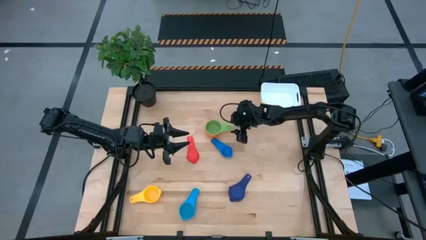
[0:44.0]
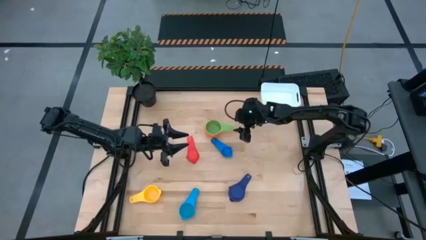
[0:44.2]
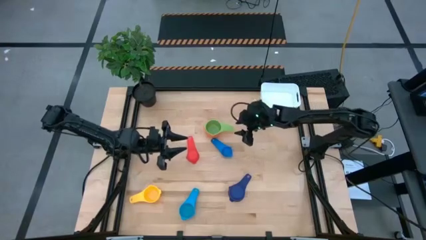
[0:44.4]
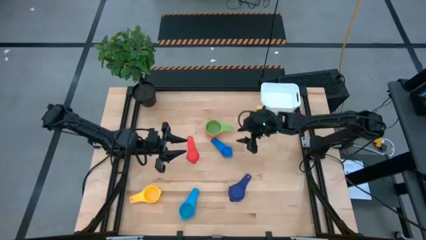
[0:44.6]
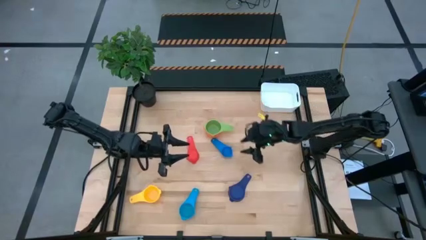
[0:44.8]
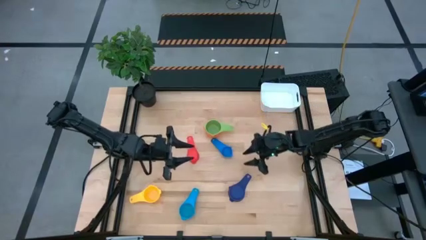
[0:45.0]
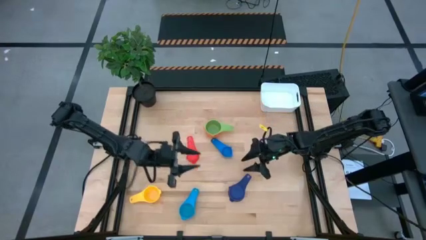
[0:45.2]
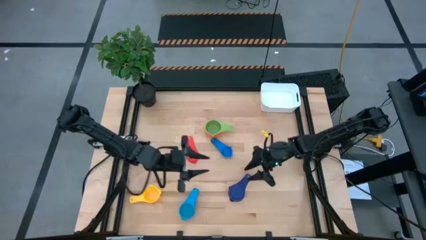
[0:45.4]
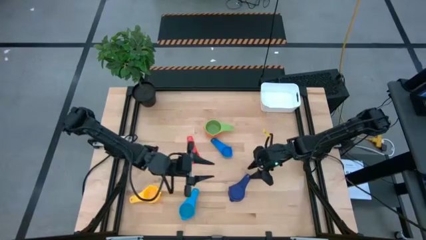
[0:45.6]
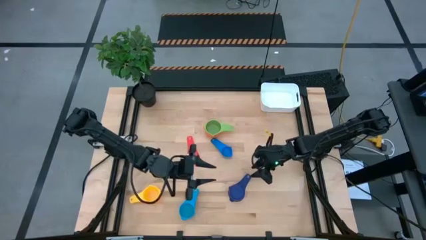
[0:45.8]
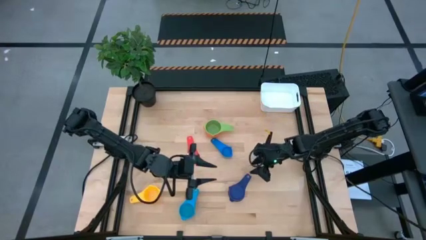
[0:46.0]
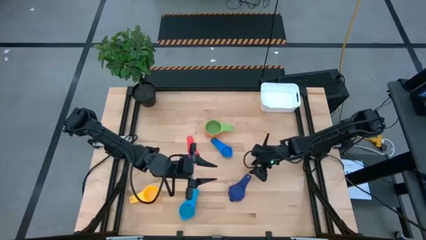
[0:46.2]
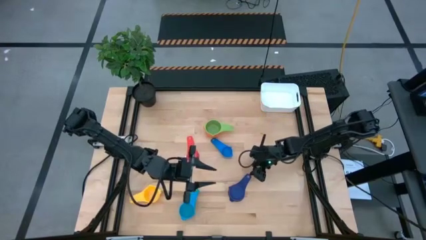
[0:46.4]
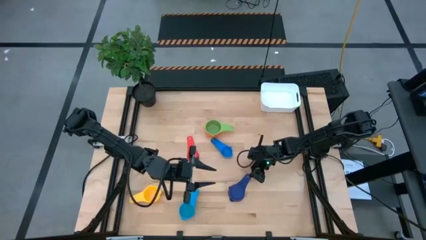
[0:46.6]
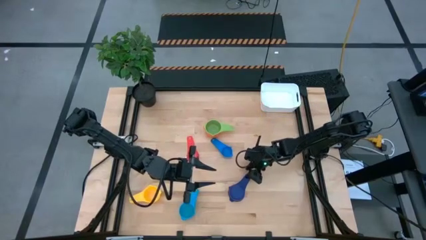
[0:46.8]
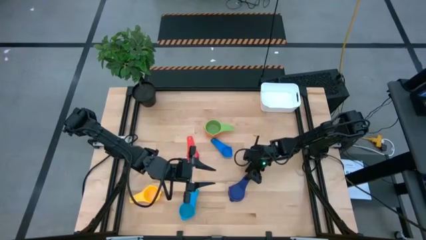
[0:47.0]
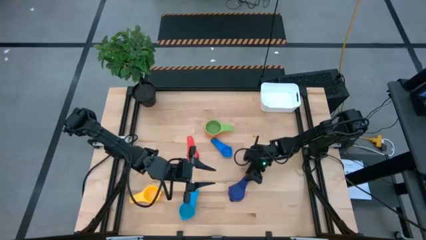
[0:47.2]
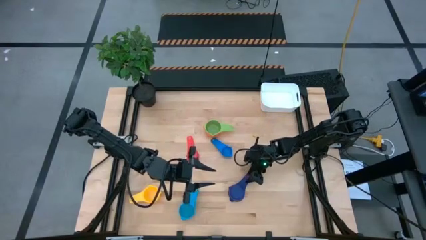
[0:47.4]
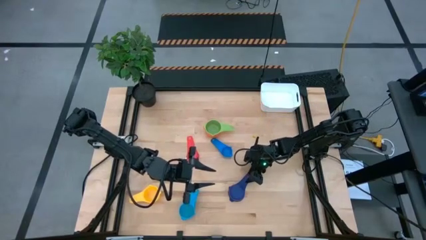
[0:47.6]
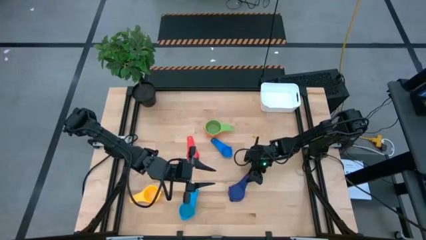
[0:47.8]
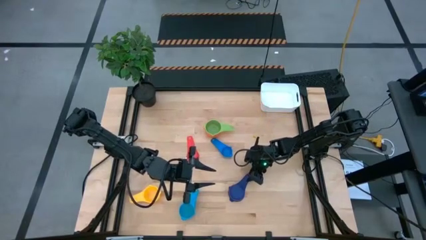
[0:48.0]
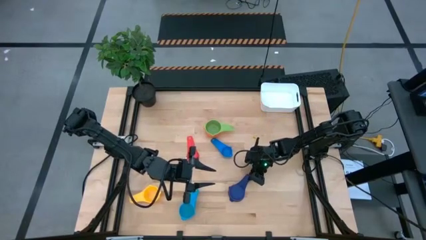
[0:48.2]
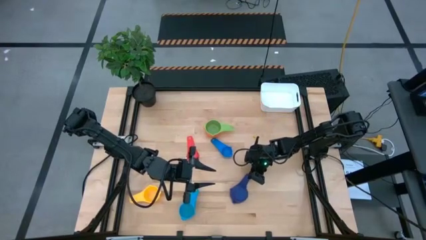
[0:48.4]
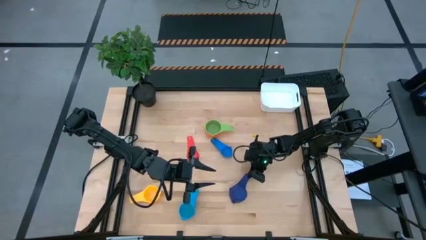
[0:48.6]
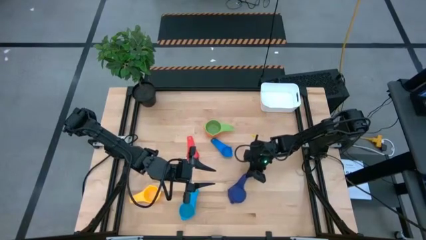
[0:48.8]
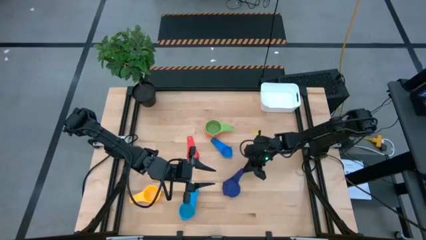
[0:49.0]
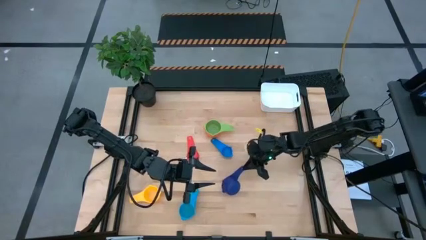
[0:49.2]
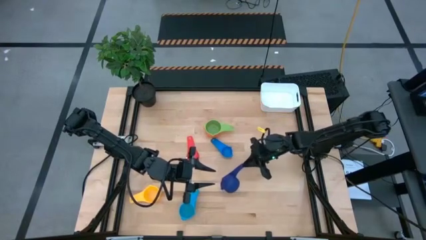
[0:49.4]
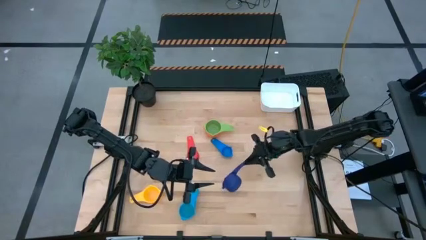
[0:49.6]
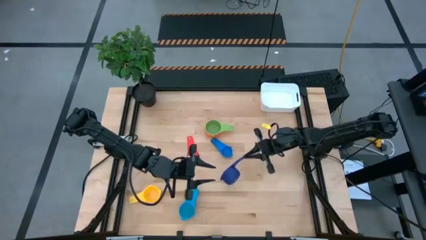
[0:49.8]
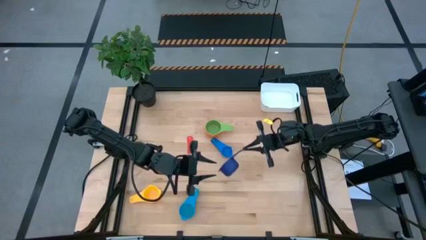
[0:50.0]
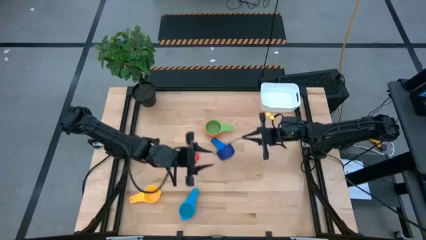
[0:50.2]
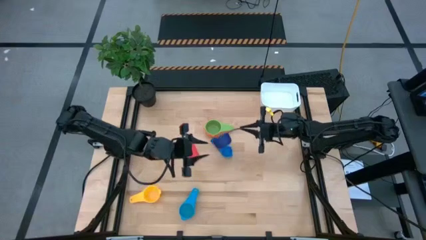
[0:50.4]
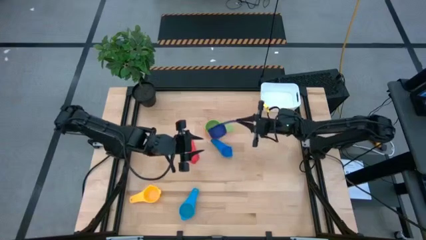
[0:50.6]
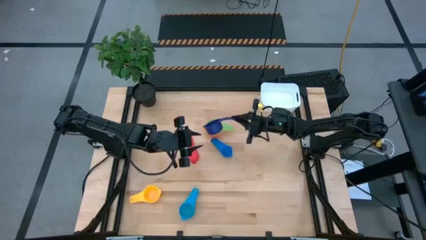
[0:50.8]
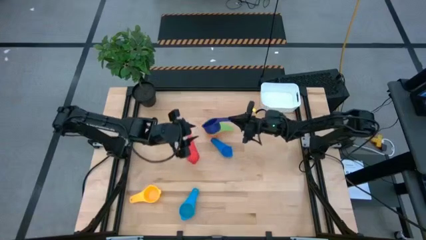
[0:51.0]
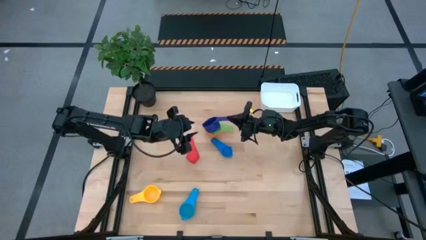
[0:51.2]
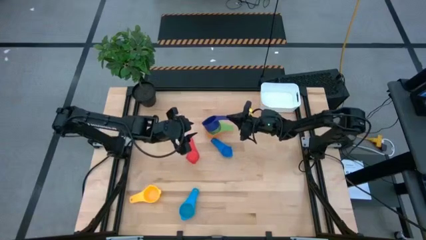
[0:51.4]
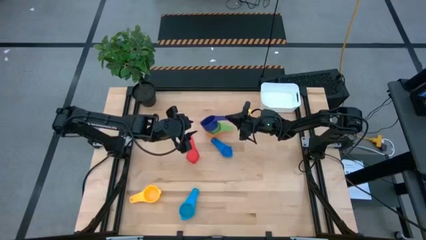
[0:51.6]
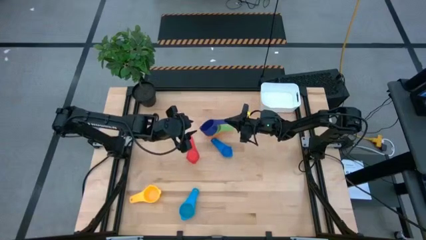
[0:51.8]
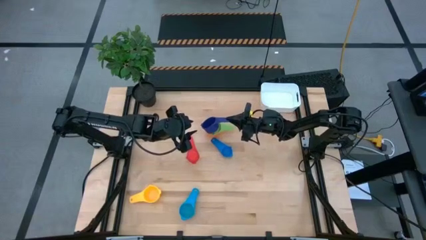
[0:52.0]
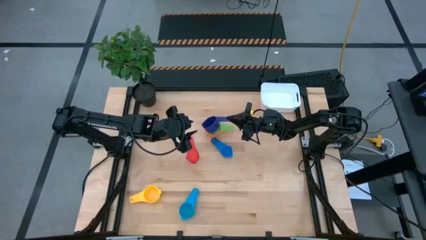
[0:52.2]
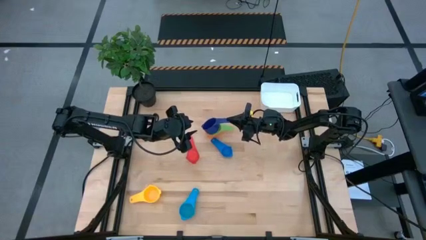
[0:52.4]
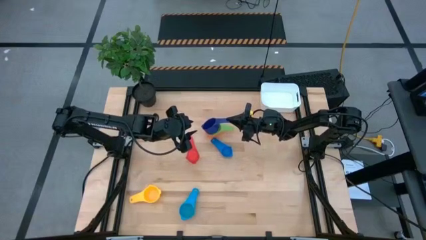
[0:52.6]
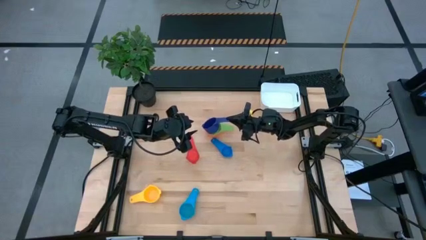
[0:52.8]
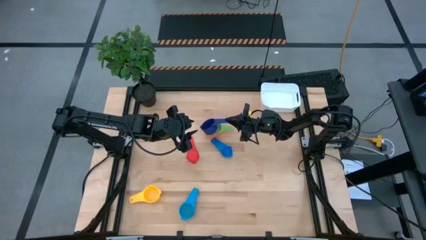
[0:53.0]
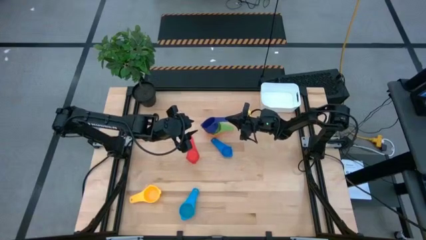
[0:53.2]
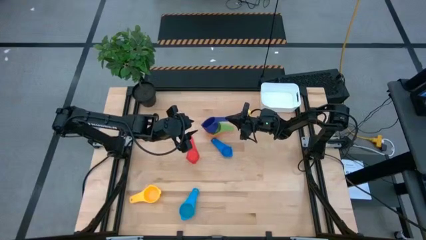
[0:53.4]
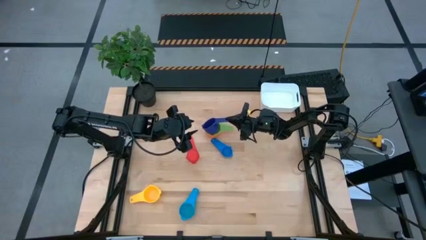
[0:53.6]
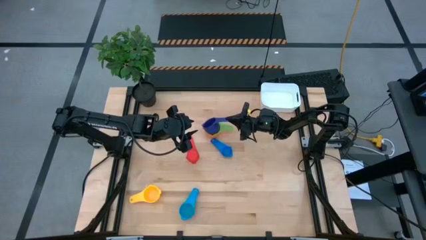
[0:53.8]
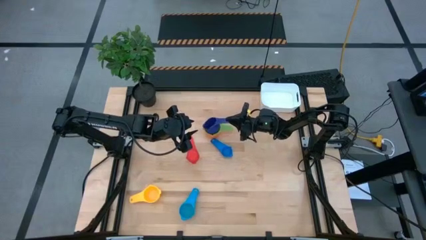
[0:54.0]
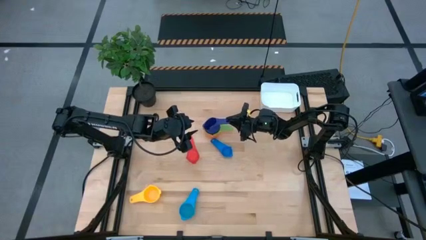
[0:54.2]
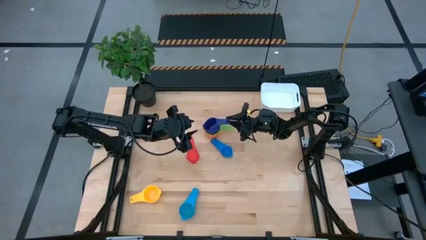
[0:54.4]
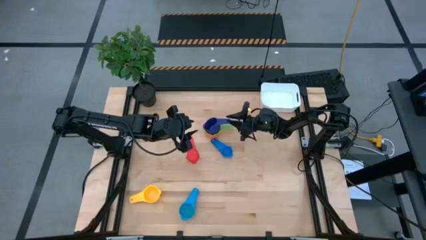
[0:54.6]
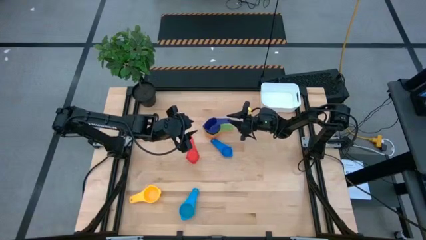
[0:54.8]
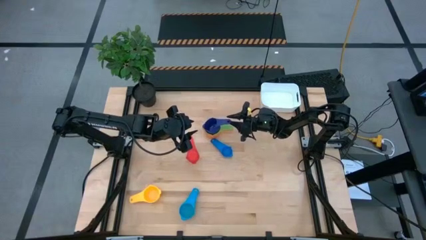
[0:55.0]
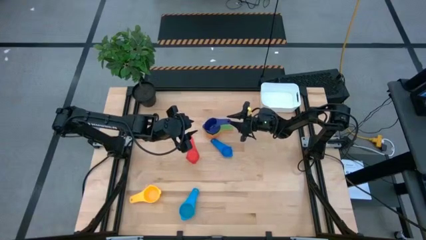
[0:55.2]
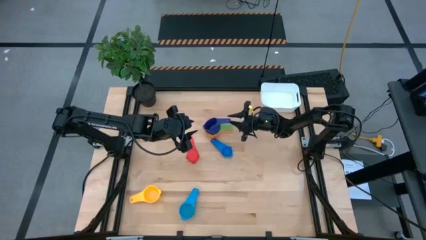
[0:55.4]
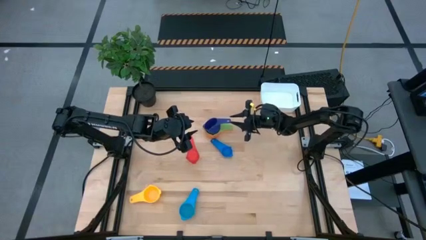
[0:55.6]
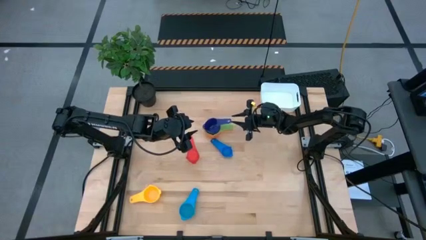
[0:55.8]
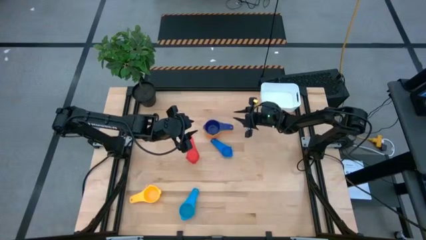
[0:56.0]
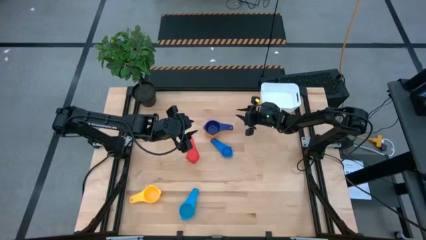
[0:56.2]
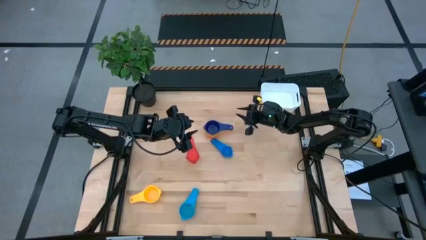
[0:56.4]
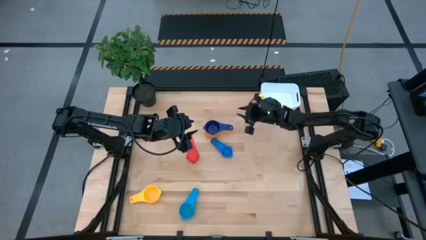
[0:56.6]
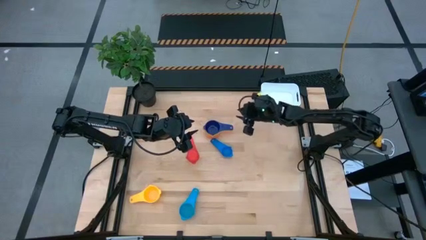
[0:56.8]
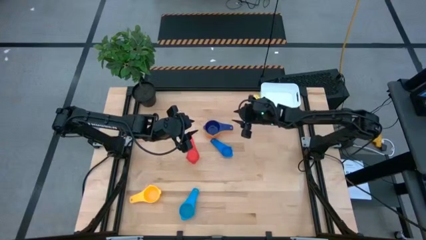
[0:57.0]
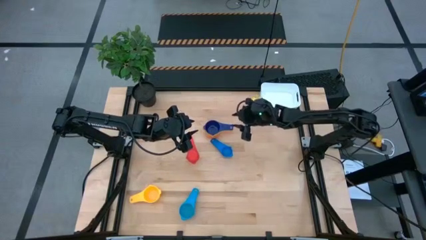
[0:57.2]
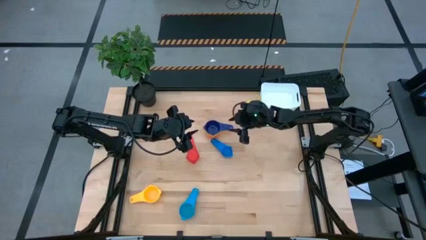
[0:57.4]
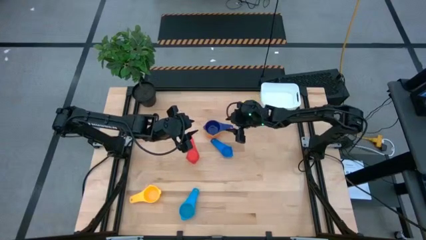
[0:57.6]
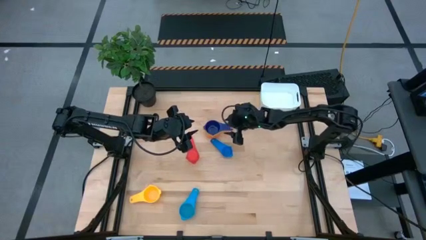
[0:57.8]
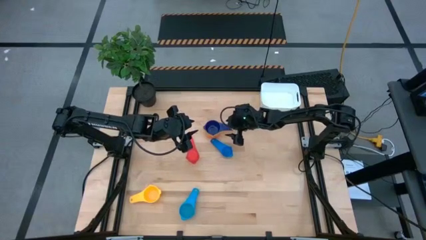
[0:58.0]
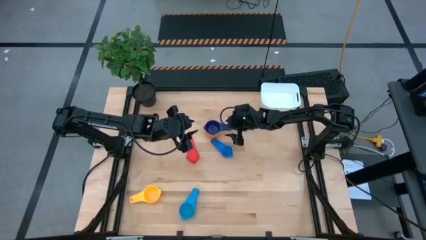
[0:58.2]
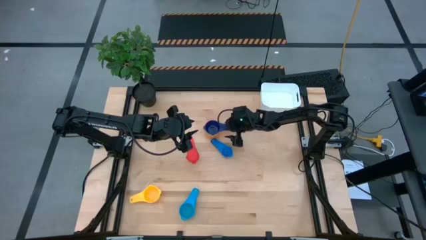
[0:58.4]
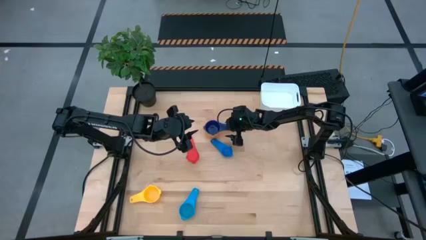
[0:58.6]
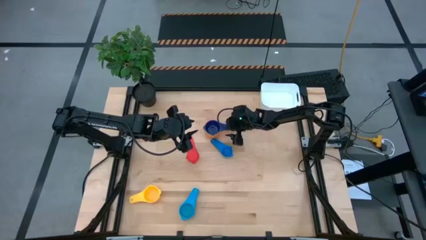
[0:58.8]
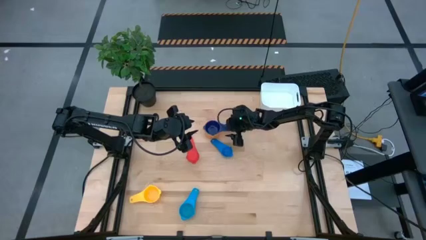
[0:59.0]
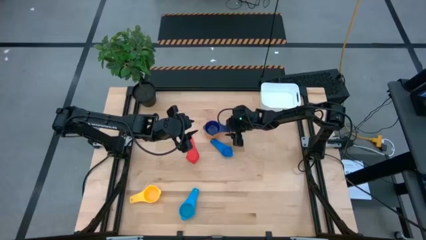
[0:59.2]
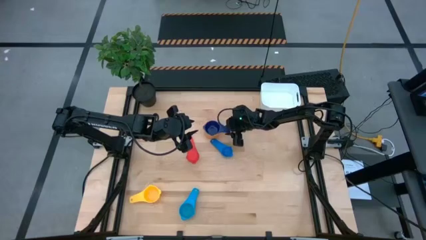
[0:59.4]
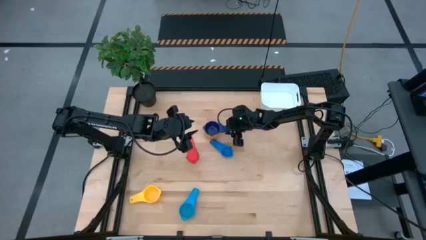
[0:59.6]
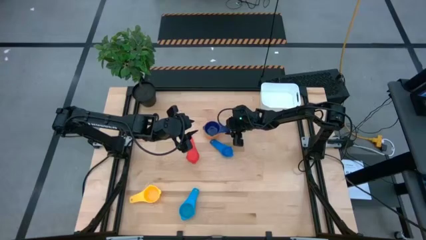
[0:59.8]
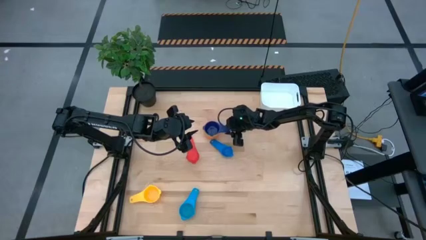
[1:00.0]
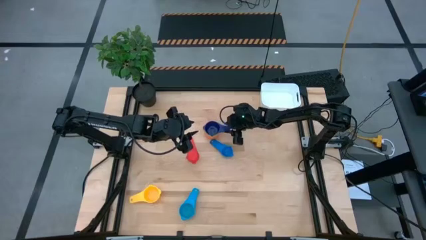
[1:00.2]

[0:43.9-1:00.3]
Task: Nest measuring cups in basket
Stack the dark blue measuring cup into the green measuring cup
